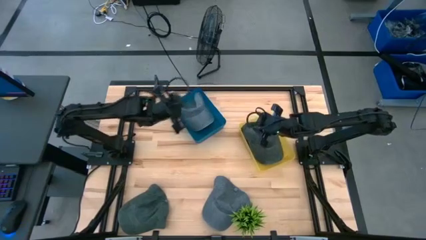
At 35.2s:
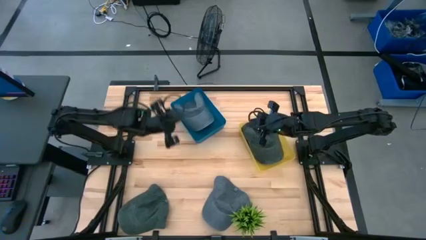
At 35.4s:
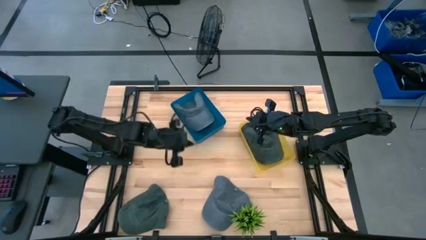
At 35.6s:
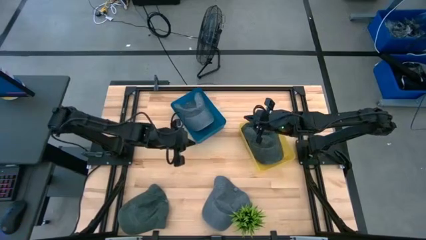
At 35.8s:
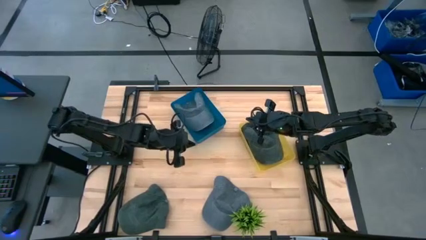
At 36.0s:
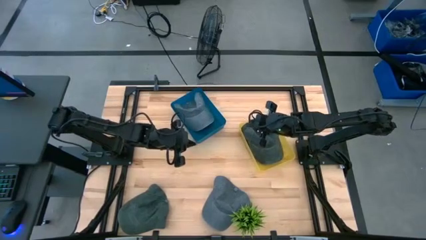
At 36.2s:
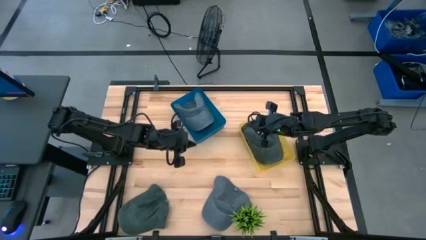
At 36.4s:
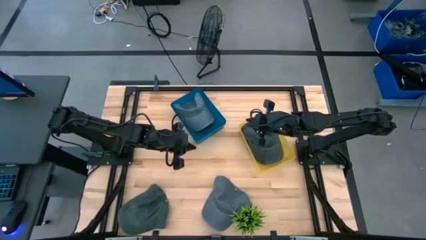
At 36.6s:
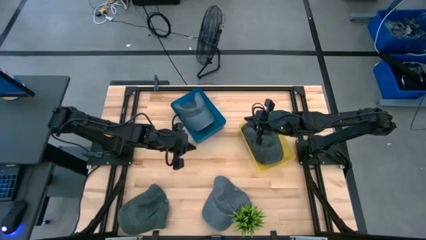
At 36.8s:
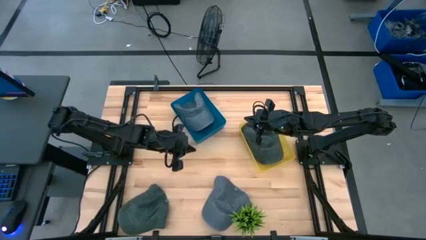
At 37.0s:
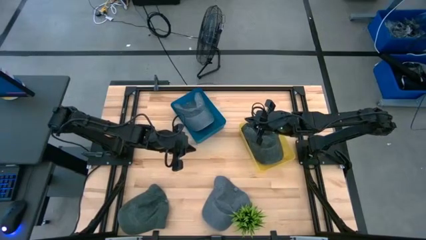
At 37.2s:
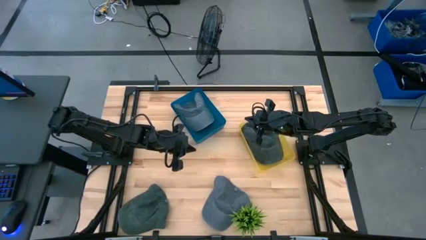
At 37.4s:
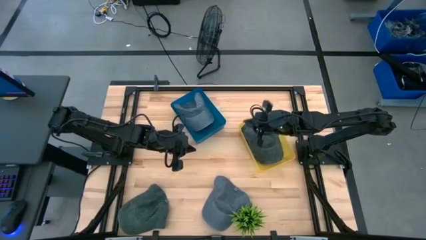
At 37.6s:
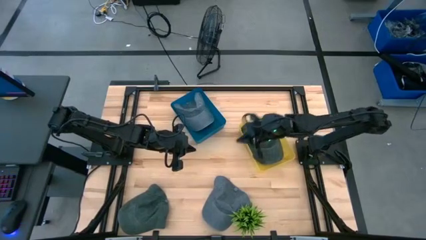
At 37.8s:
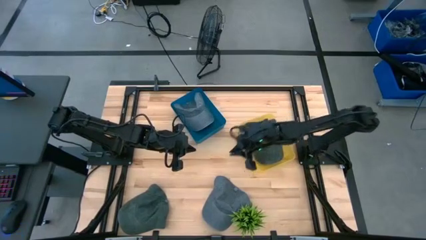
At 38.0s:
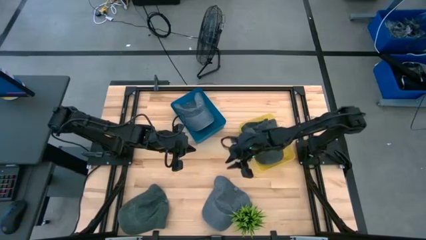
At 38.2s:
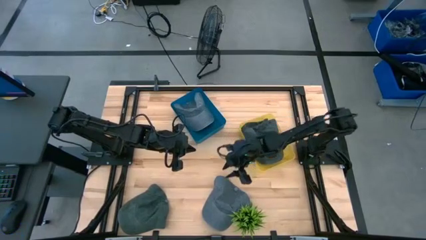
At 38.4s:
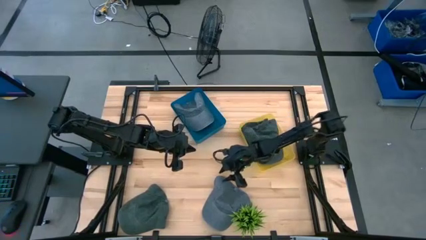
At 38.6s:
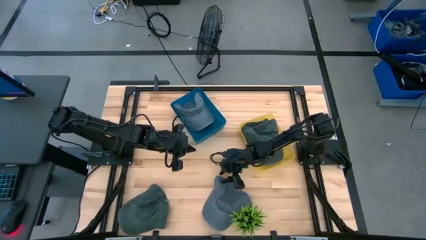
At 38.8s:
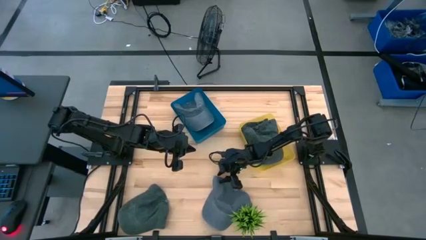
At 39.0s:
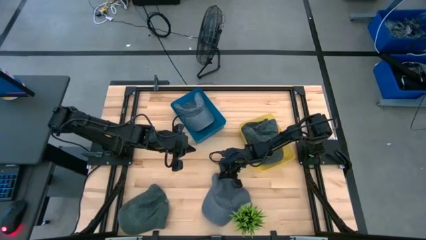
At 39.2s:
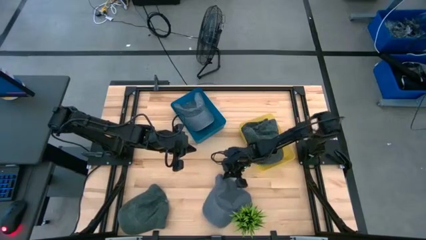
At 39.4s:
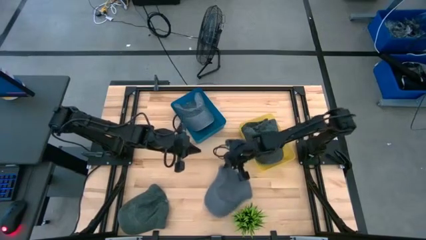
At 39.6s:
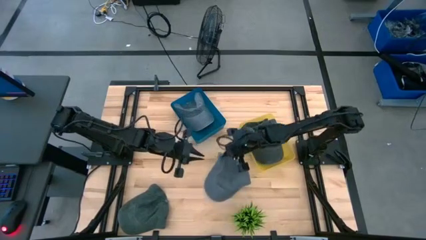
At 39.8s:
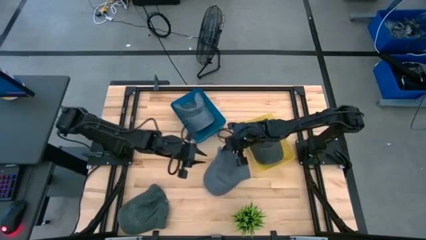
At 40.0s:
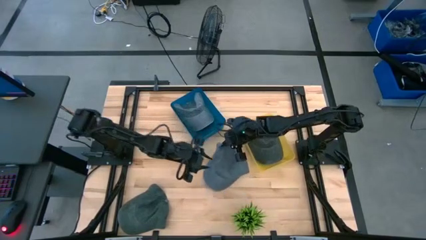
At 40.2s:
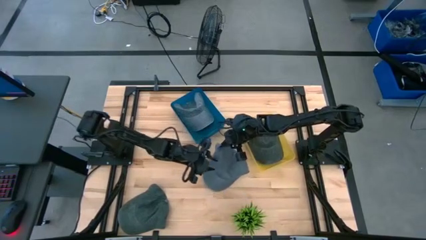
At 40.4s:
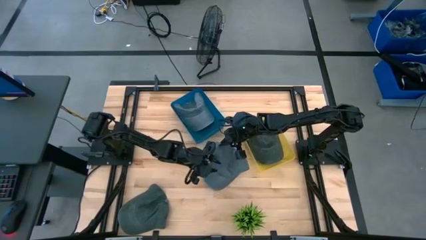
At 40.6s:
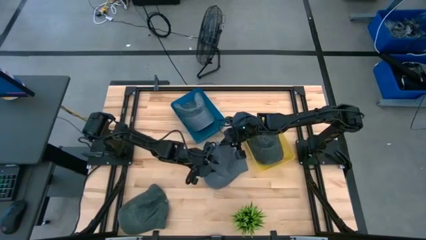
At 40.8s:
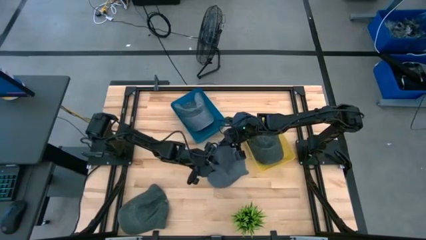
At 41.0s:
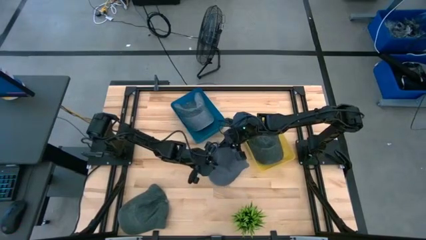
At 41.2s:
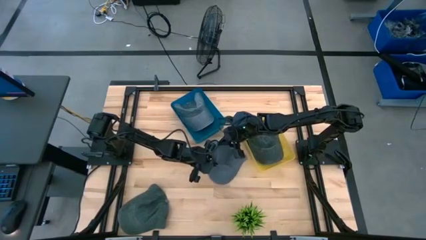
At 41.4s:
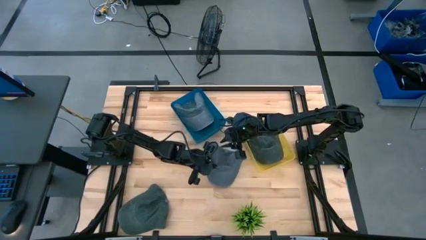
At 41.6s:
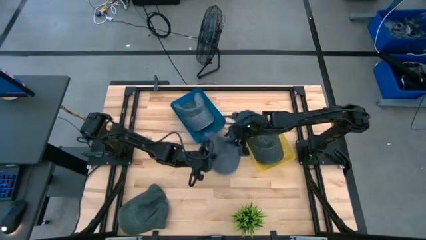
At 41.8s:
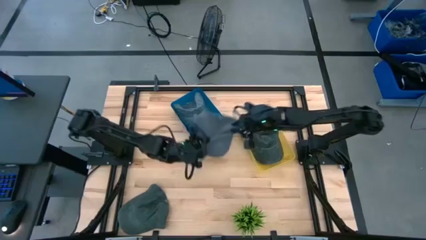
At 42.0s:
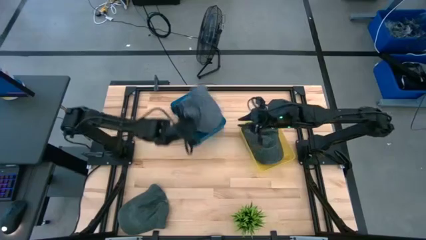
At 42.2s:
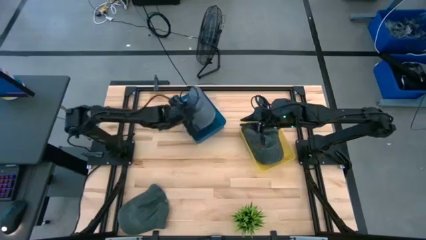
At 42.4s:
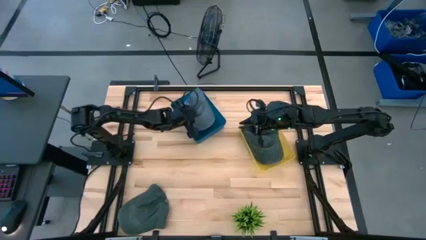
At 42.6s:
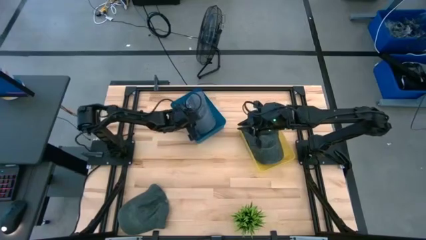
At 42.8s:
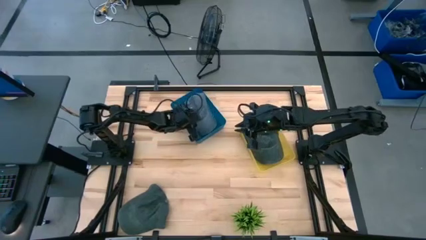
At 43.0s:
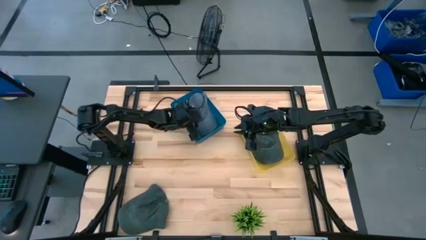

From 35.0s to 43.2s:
Task: Pick & Place hat
Put the gray cap into the blue bin

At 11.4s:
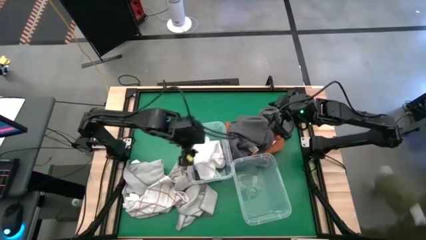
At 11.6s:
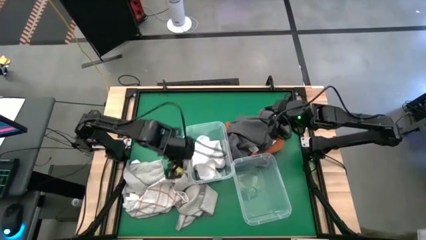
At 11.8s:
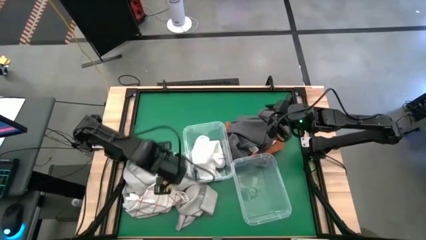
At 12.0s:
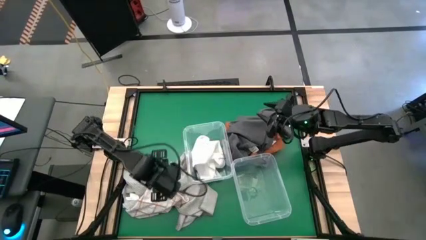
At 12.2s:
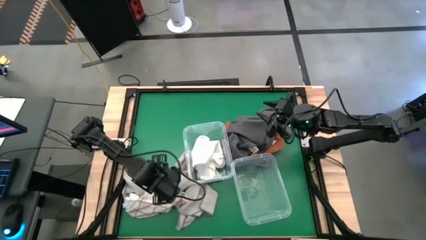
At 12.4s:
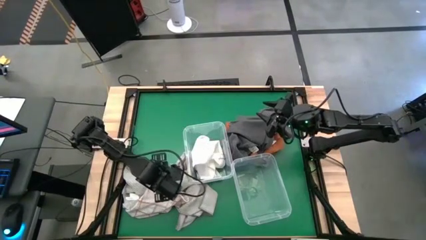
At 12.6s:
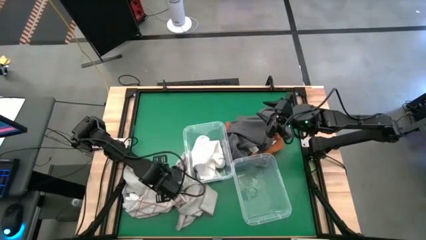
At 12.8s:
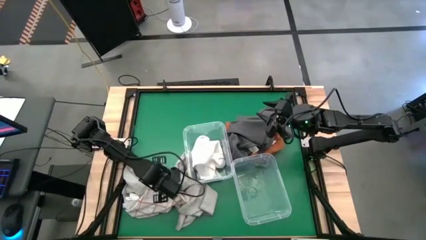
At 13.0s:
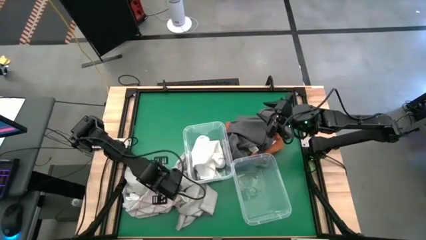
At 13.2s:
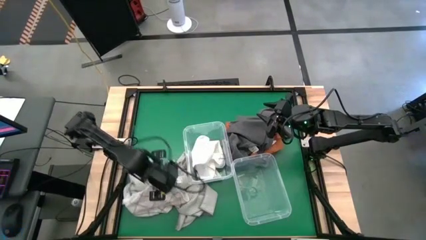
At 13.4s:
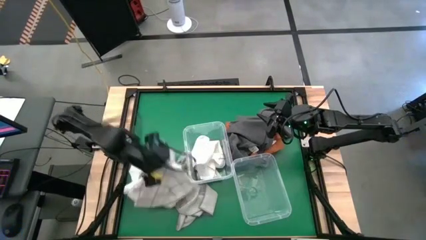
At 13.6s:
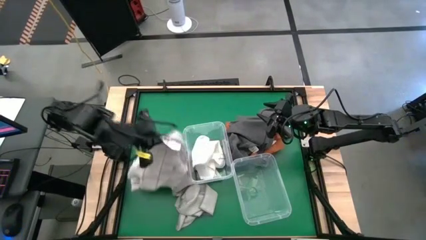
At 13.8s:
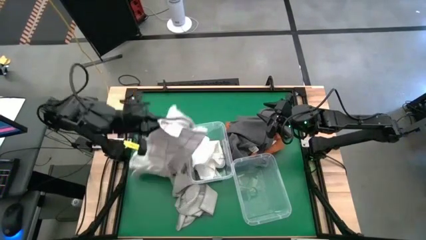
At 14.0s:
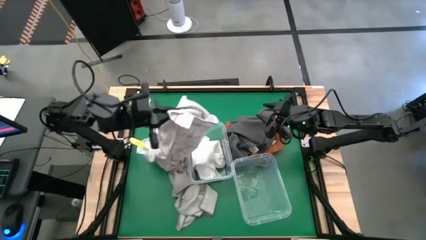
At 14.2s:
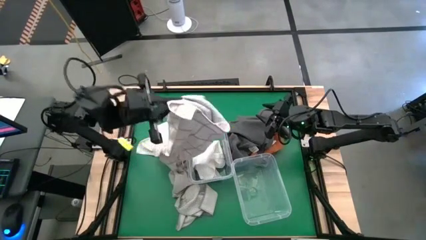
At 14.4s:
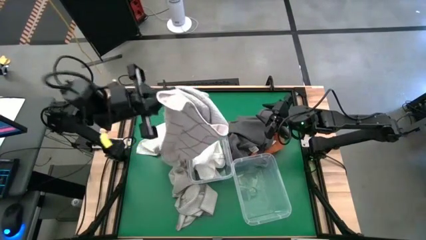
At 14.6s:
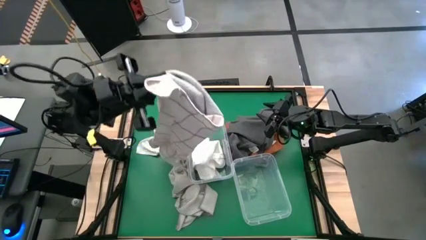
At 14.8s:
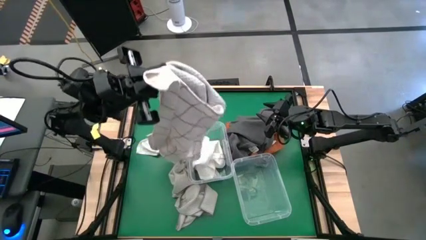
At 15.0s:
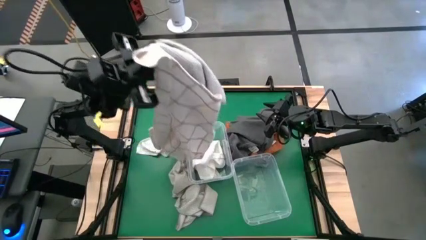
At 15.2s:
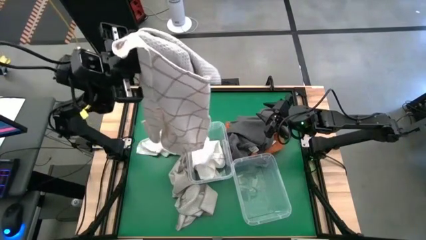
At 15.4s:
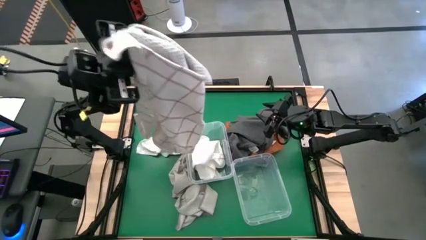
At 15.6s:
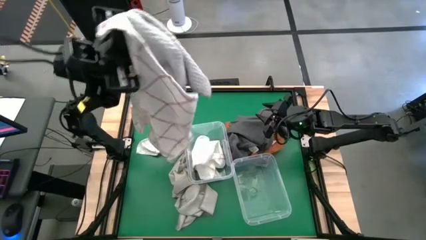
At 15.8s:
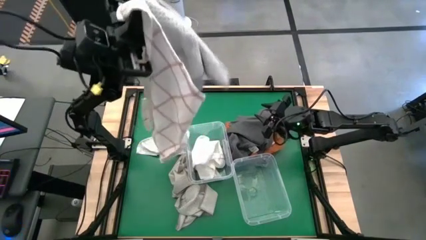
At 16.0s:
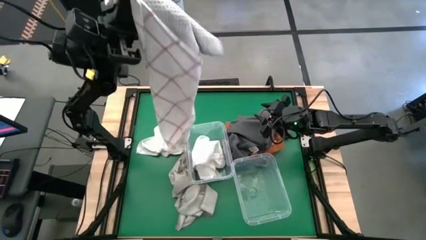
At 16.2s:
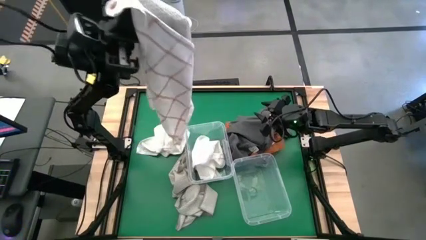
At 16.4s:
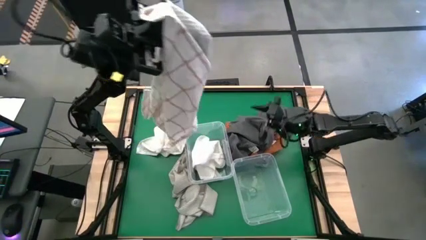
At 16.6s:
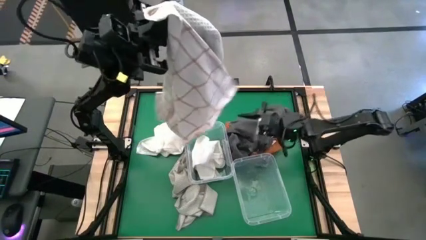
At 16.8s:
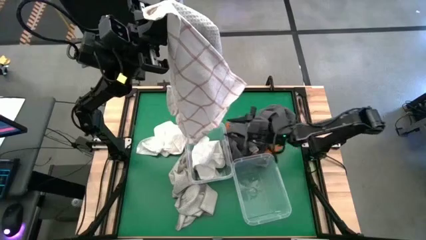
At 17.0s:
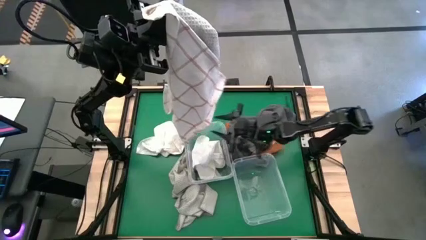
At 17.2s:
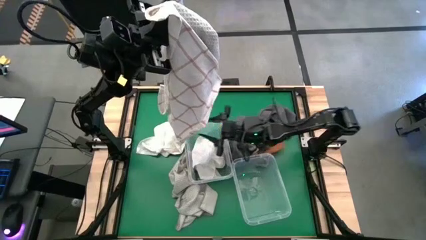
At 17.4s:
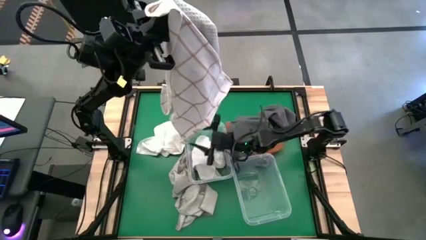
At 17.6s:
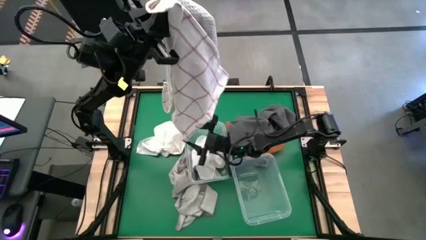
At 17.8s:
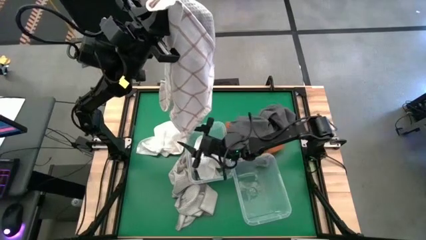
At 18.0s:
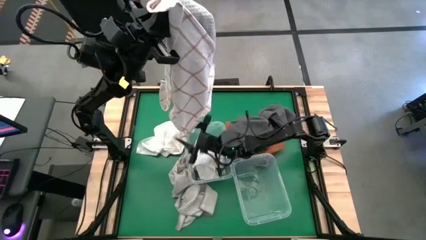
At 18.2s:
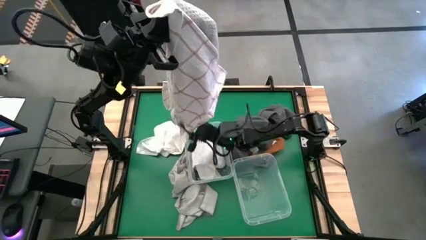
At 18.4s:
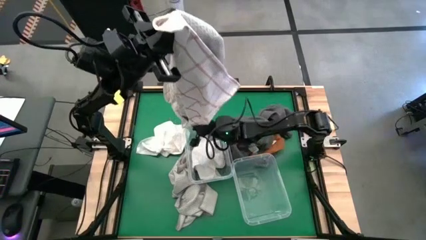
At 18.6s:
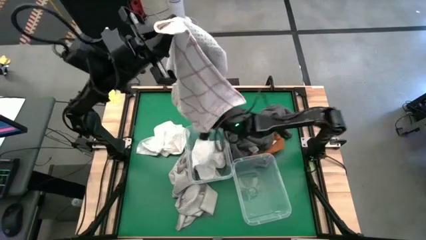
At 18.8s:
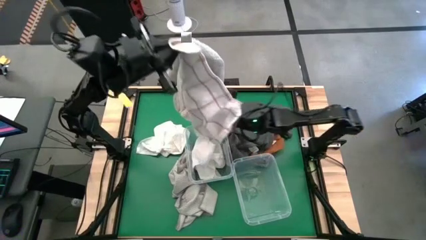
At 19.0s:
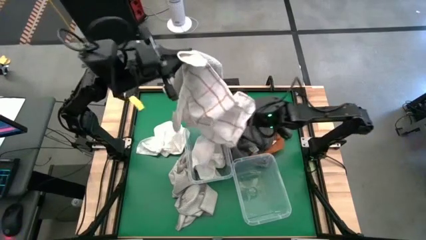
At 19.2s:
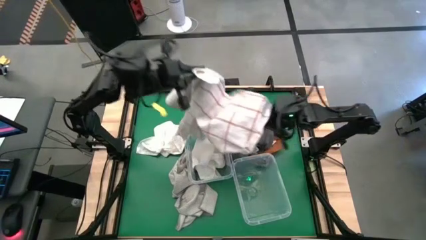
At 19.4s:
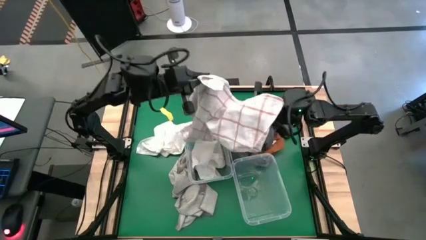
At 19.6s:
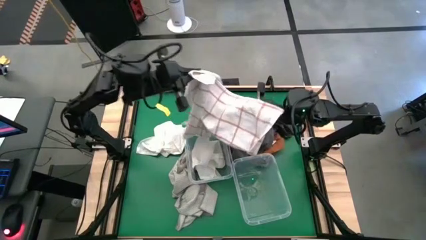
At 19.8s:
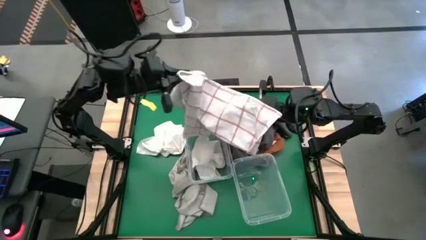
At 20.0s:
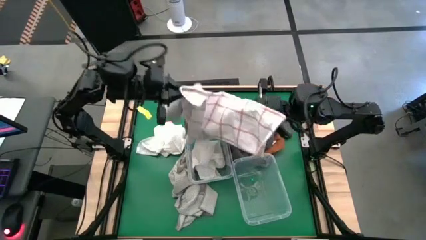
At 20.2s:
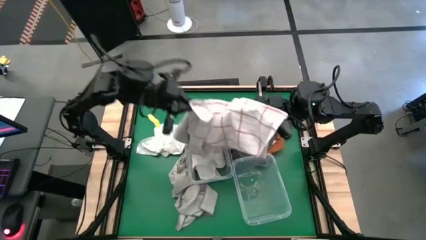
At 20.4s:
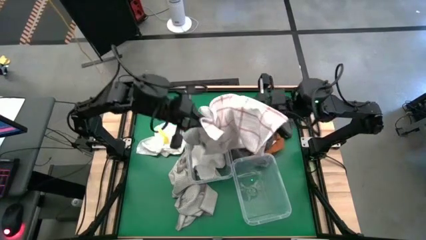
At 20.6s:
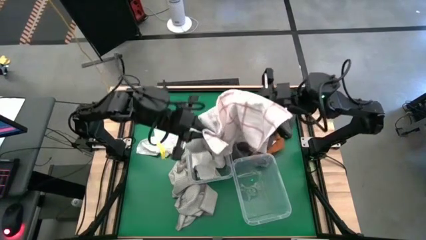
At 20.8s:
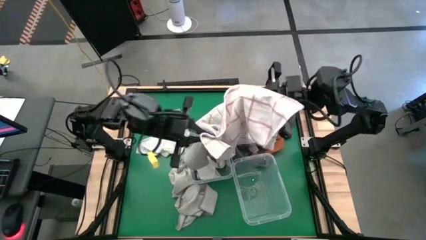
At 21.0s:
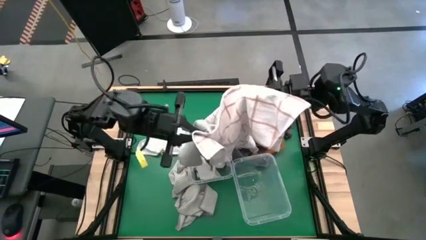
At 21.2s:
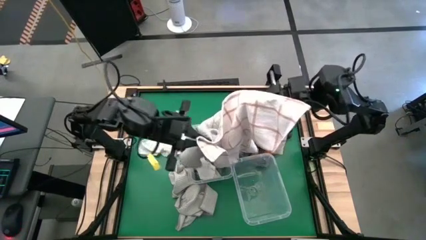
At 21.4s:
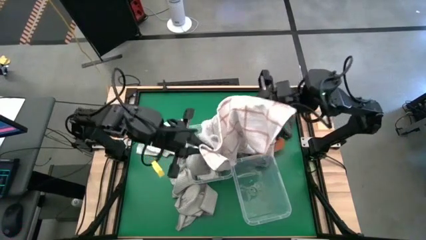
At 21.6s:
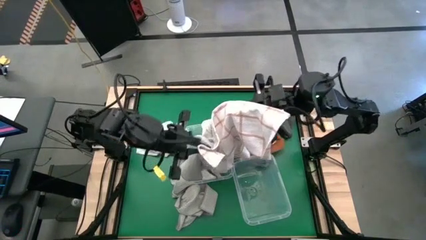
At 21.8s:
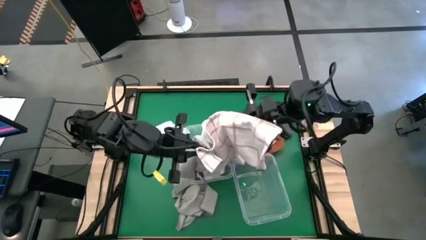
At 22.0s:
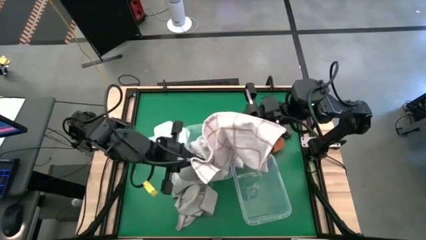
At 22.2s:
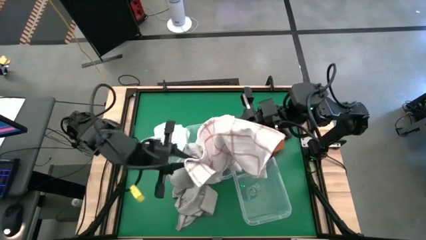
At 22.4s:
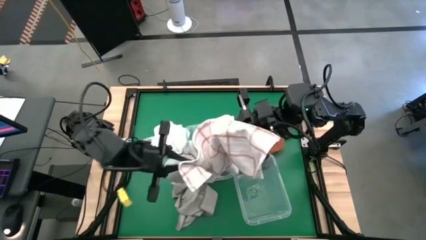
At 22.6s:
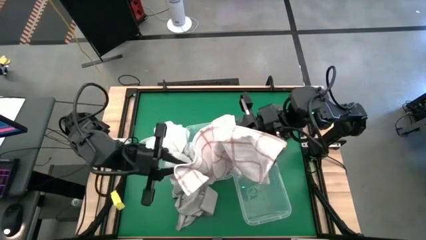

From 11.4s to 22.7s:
Task: Sort microfiber towel by color & place in baskets
Put the white patterned microfiber towel into the left transparent bin
